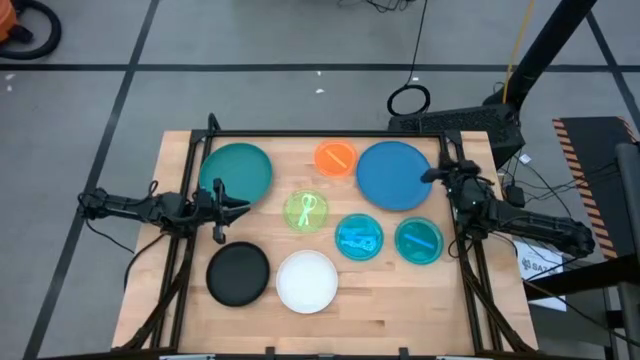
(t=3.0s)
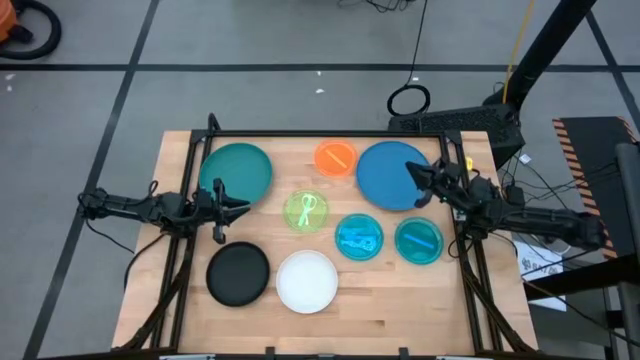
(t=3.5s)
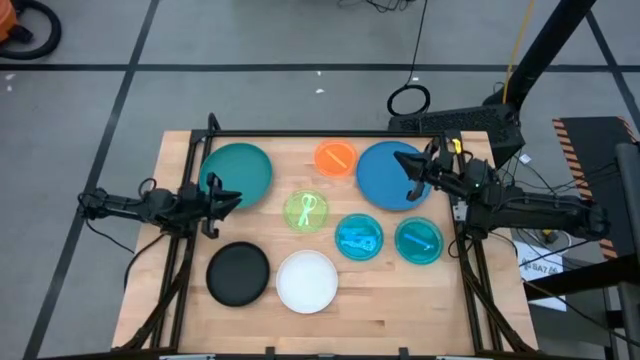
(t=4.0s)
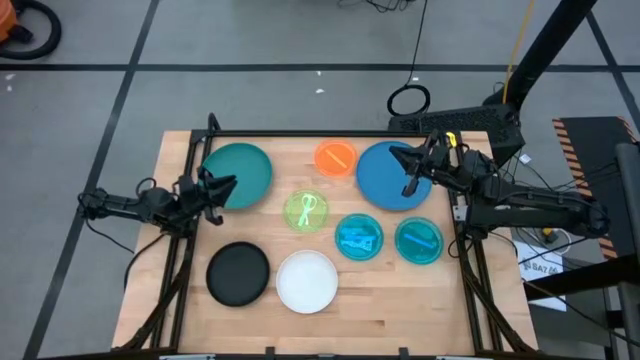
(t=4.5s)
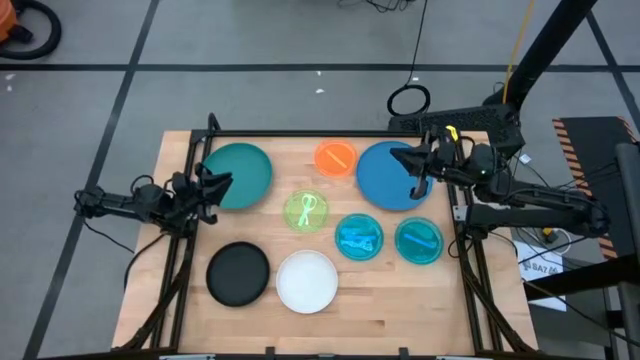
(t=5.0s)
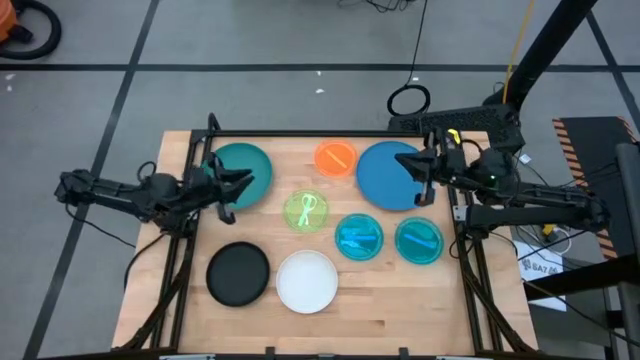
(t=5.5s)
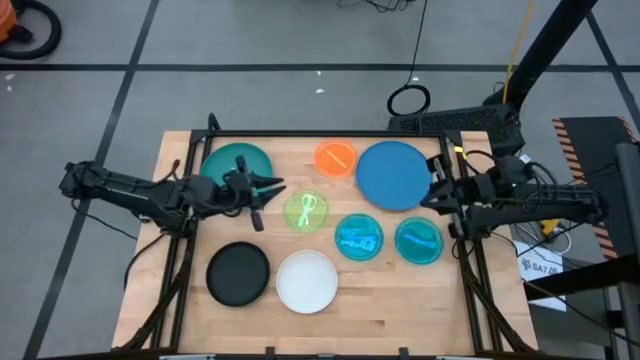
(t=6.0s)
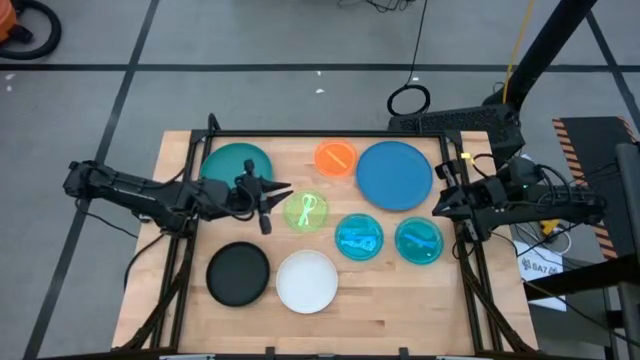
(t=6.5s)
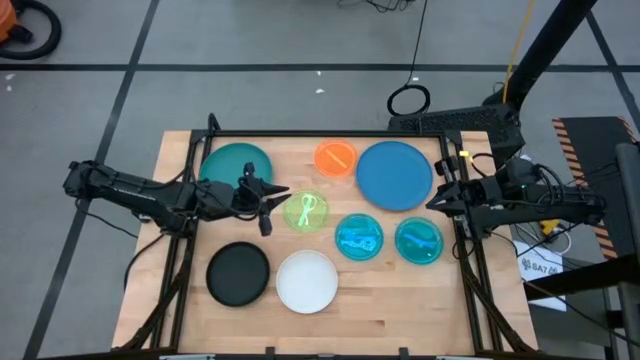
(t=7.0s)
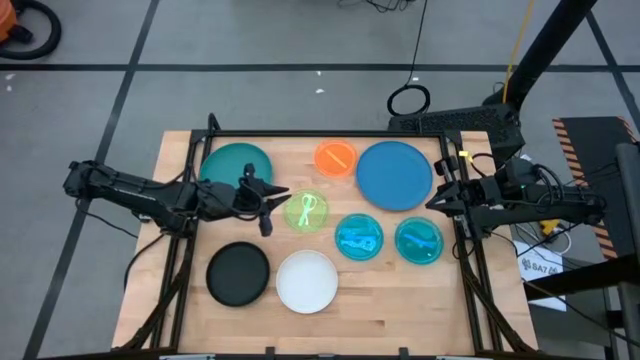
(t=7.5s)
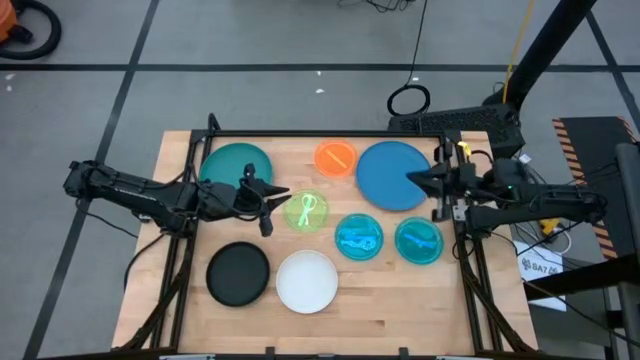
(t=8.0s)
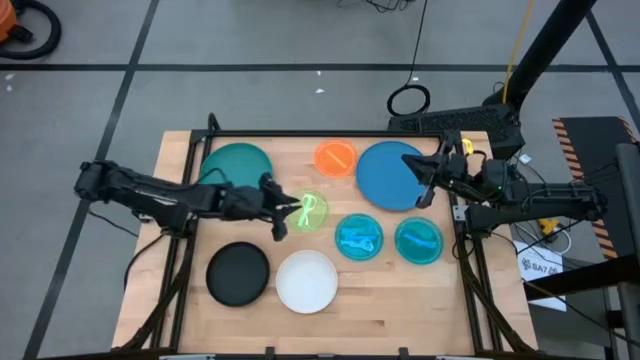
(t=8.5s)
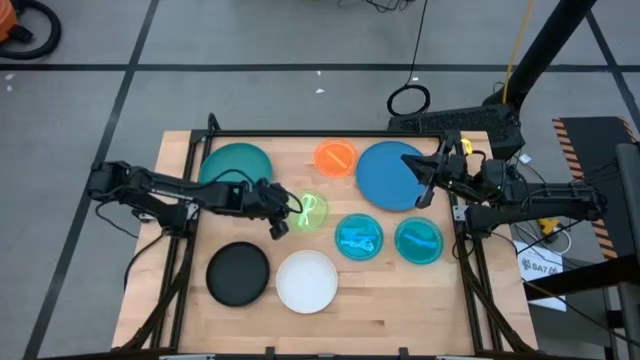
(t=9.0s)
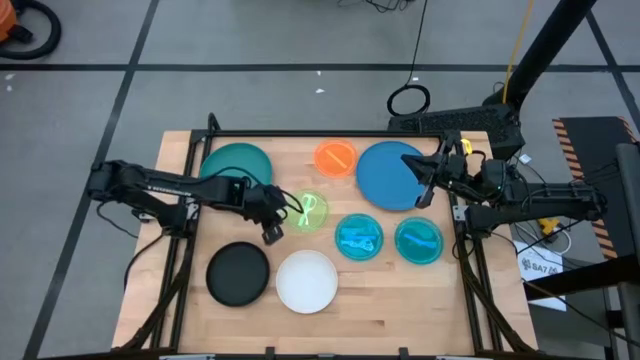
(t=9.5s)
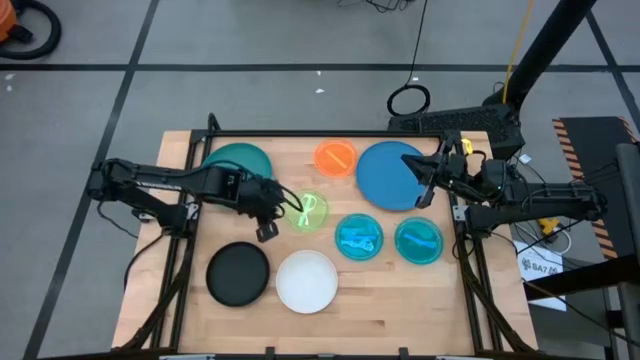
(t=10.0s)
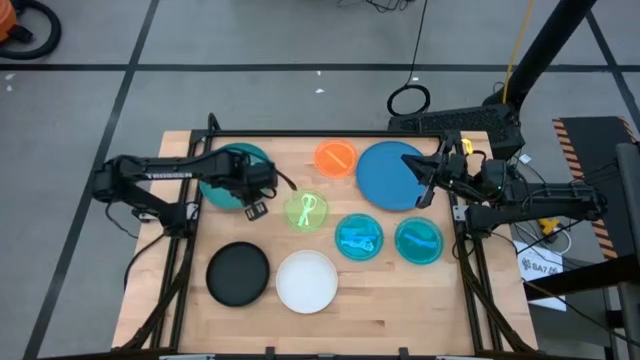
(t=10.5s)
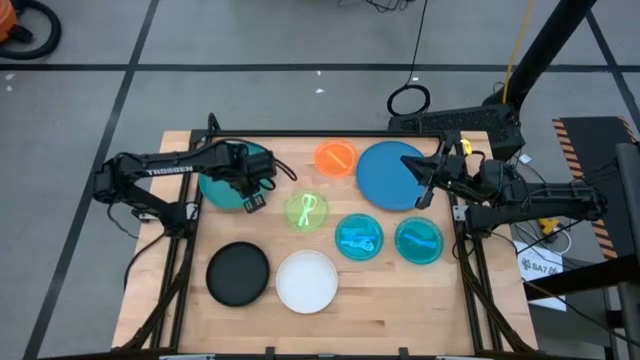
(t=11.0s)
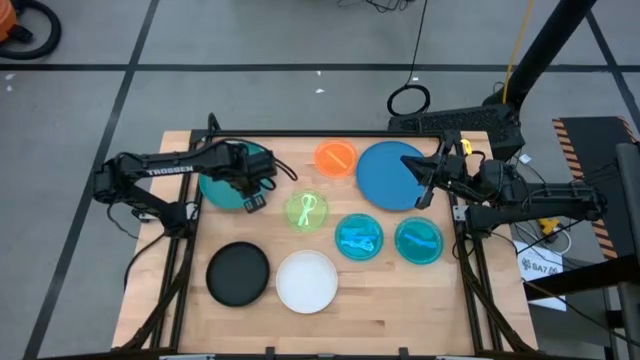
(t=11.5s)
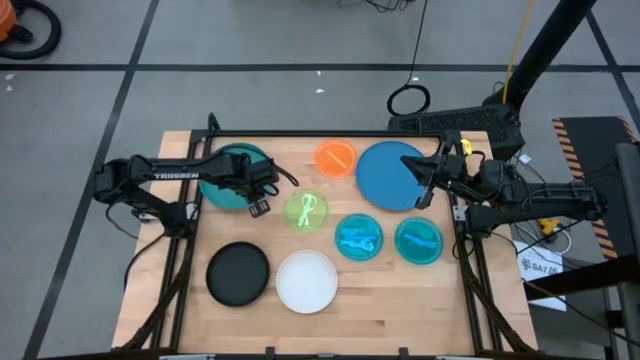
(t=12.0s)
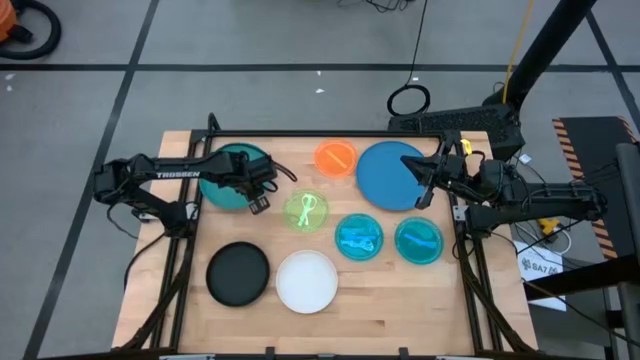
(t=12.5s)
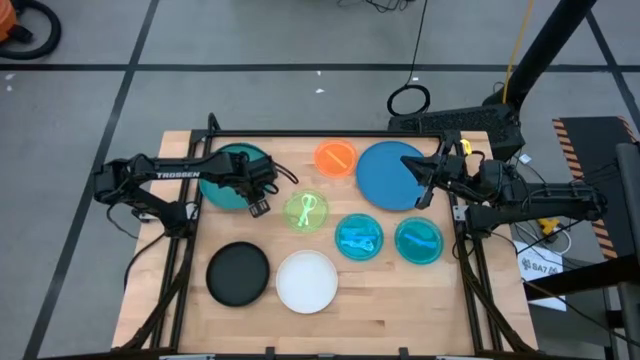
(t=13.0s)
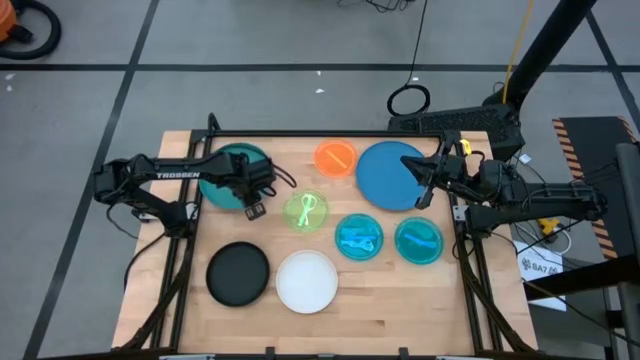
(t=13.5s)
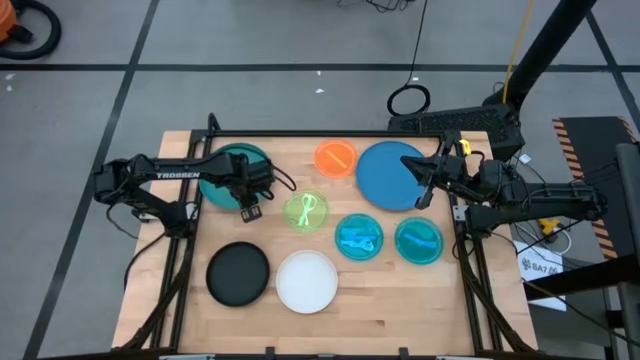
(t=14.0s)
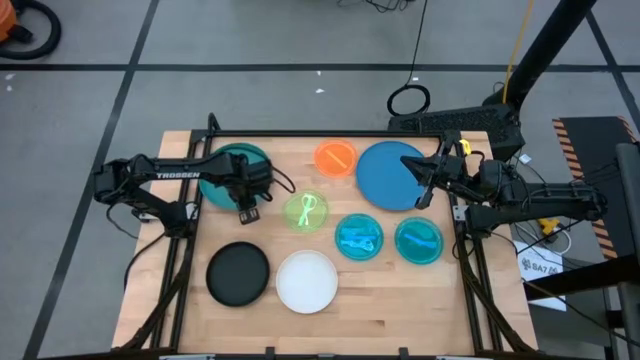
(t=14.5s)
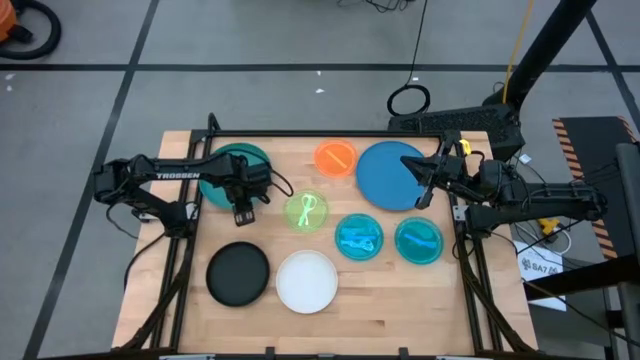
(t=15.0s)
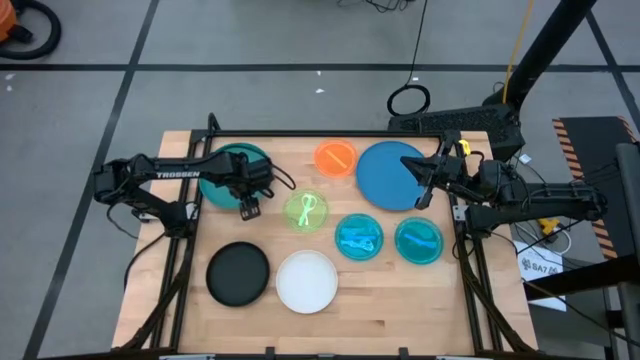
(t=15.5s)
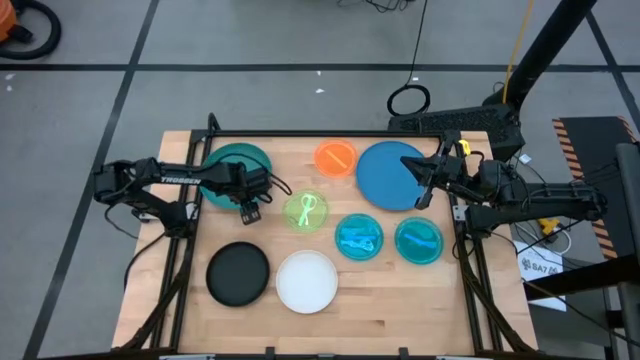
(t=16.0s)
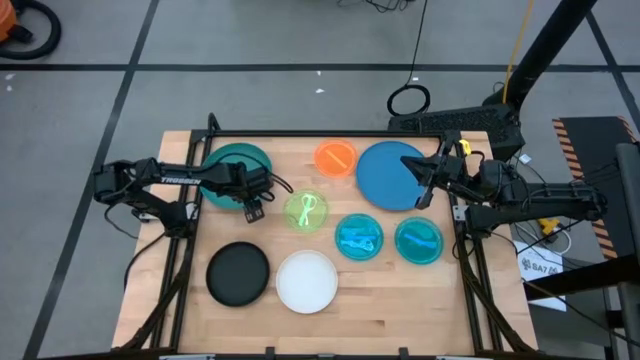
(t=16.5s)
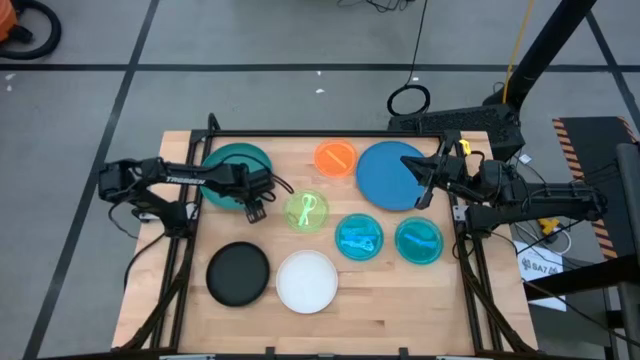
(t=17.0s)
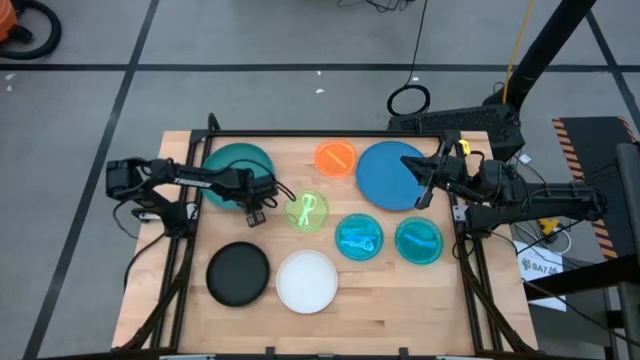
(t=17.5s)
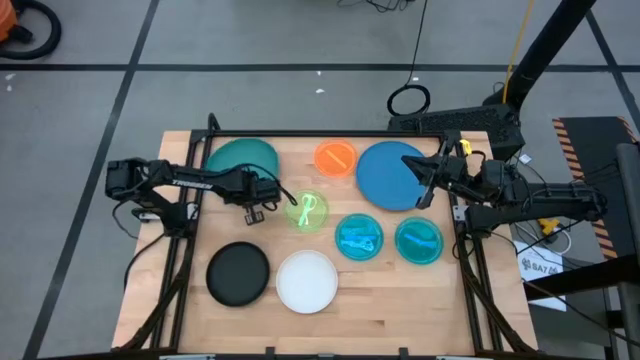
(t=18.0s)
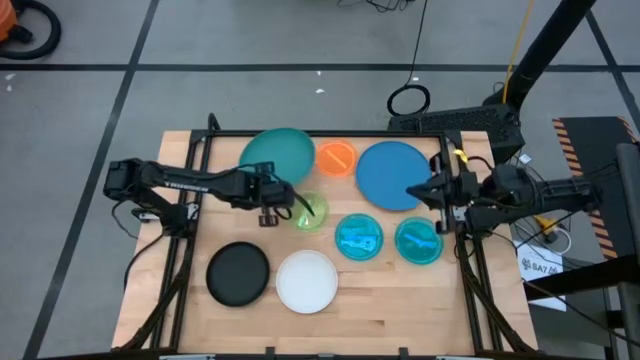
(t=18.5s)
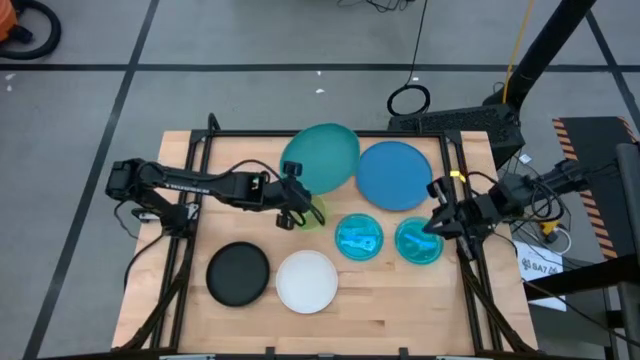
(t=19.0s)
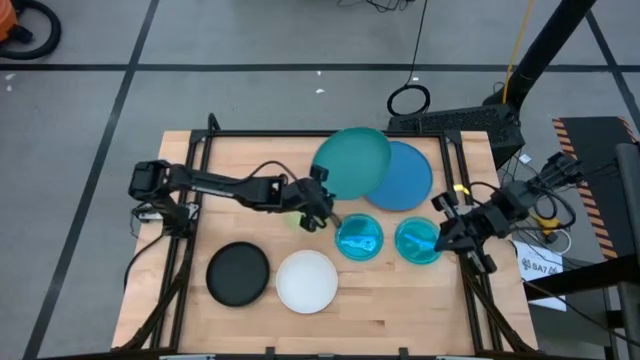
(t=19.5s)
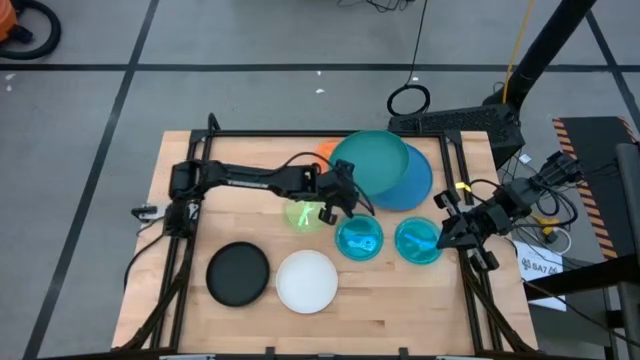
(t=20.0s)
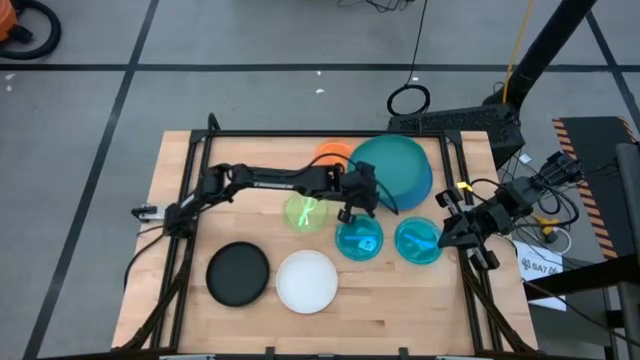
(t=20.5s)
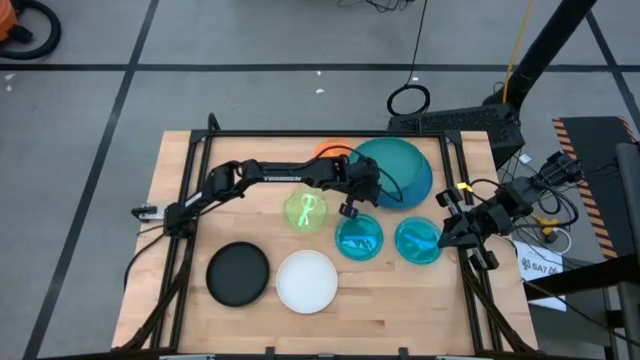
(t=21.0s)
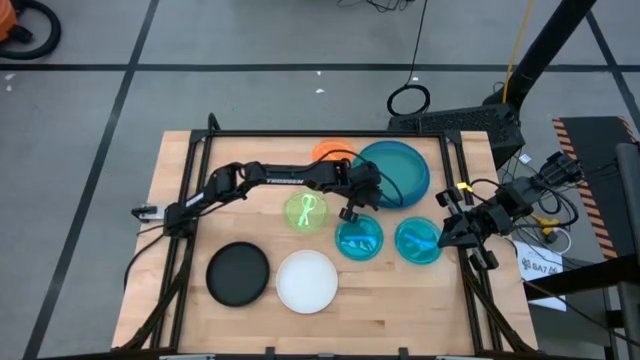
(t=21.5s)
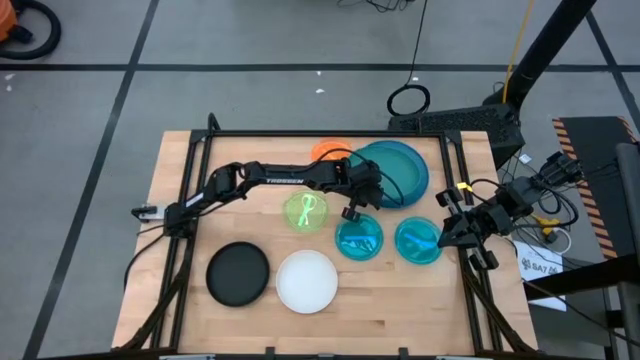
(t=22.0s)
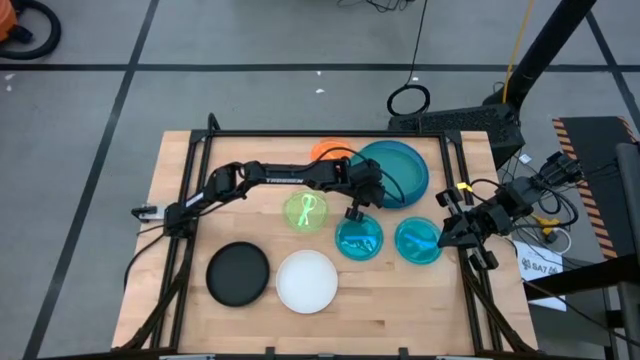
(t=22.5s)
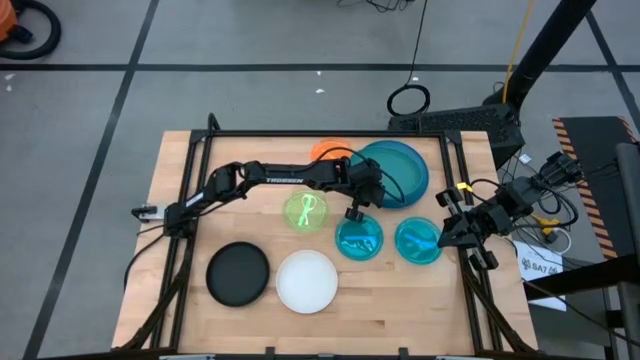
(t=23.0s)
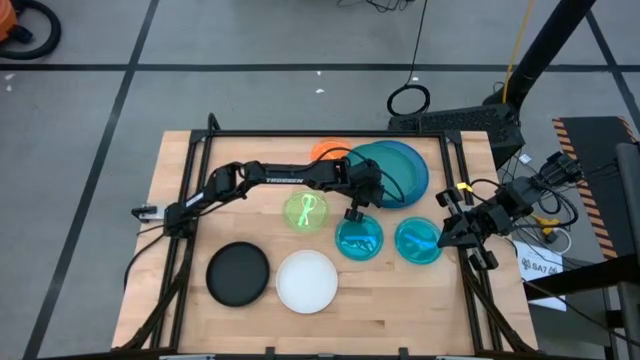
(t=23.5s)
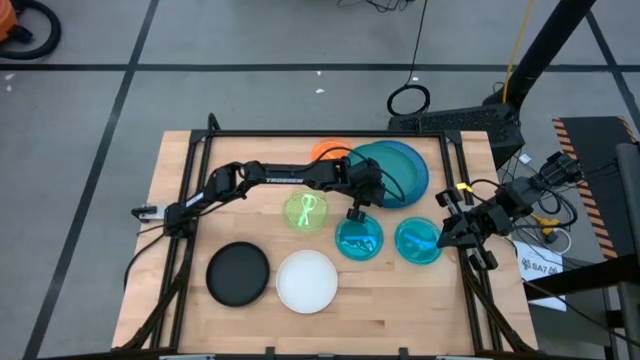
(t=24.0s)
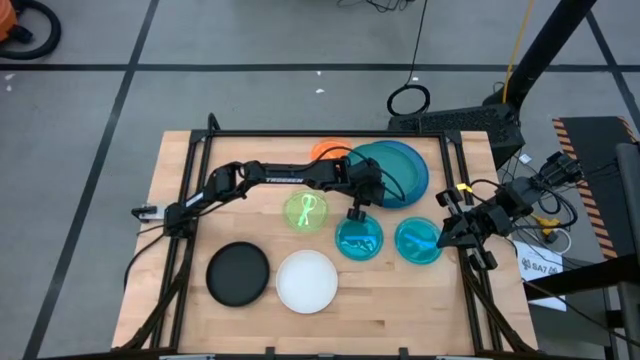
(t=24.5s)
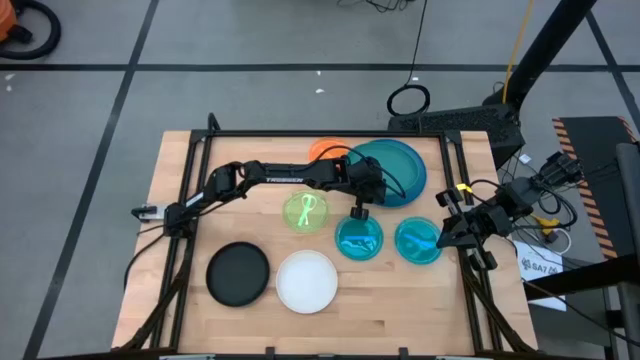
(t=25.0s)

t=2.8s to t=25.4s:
Task: Stack plastic plates
Stack the green plate on top of the blue plate
